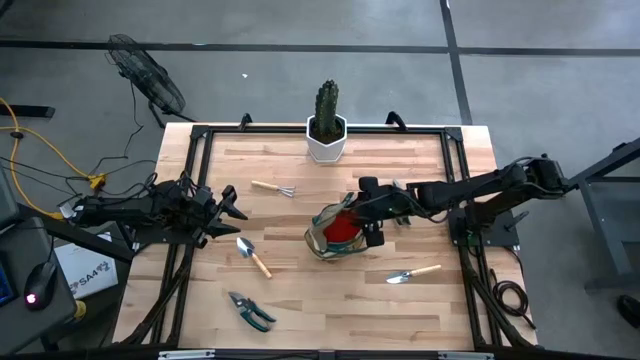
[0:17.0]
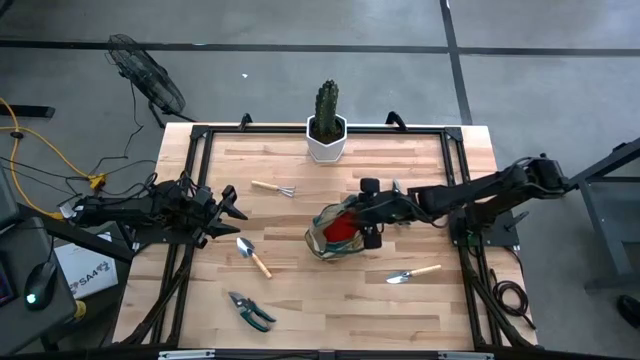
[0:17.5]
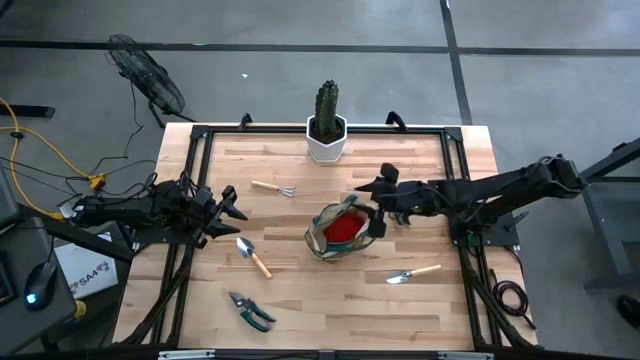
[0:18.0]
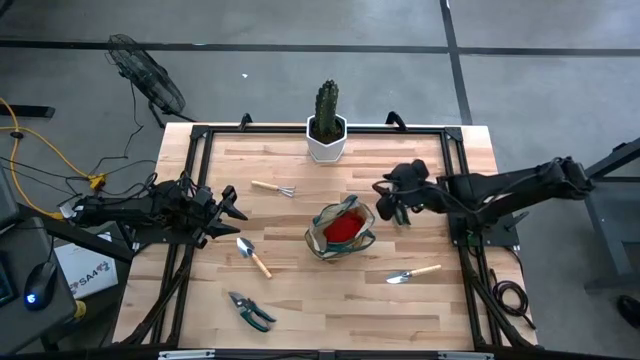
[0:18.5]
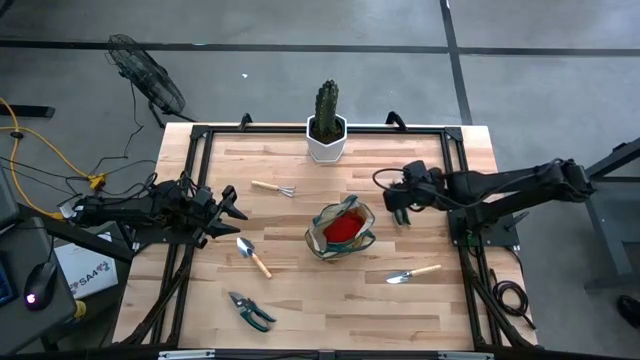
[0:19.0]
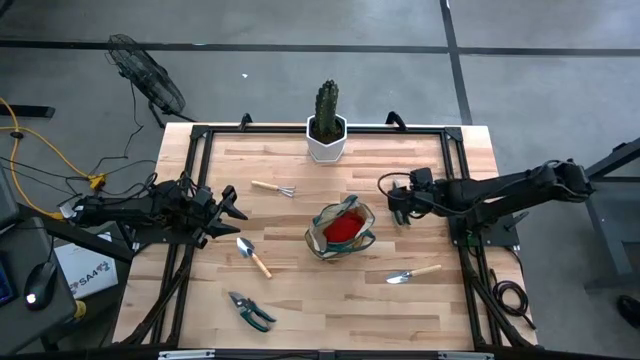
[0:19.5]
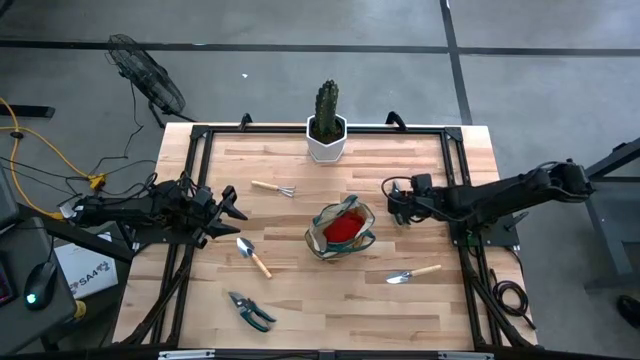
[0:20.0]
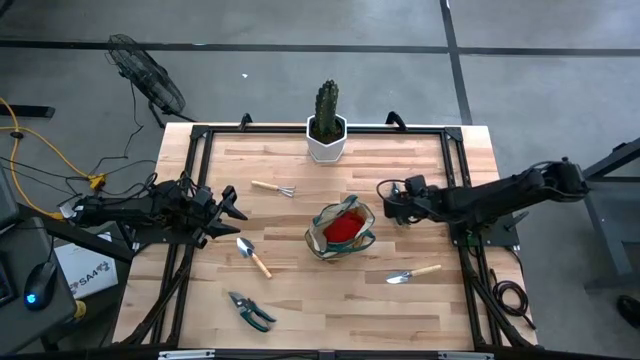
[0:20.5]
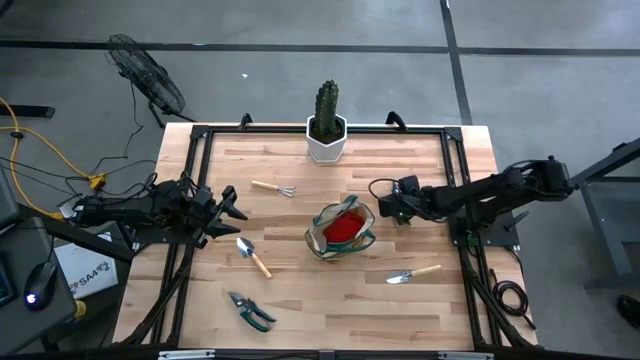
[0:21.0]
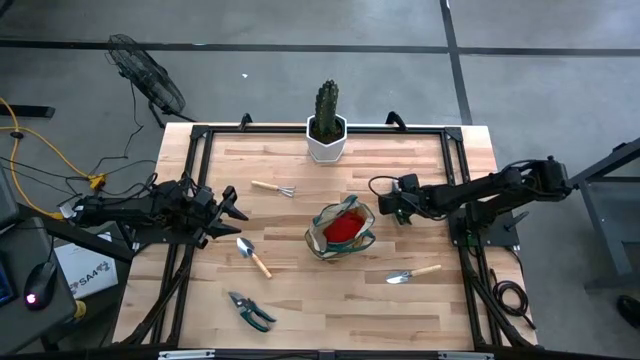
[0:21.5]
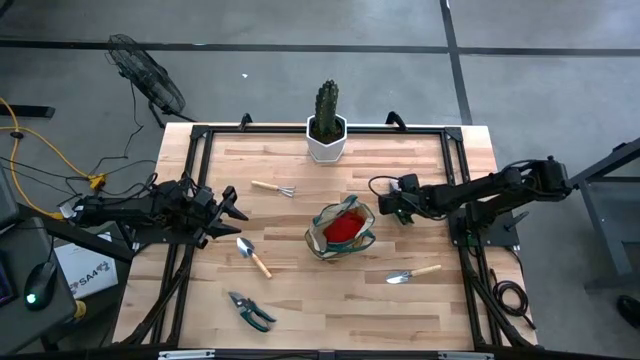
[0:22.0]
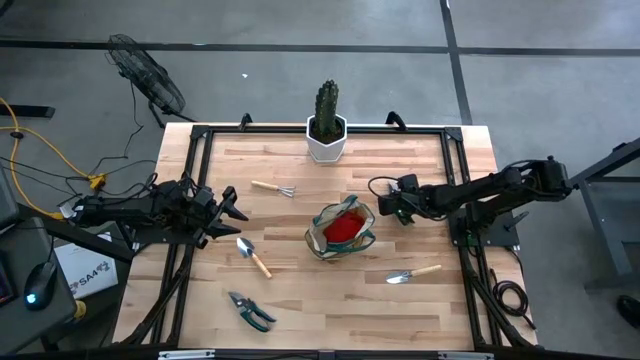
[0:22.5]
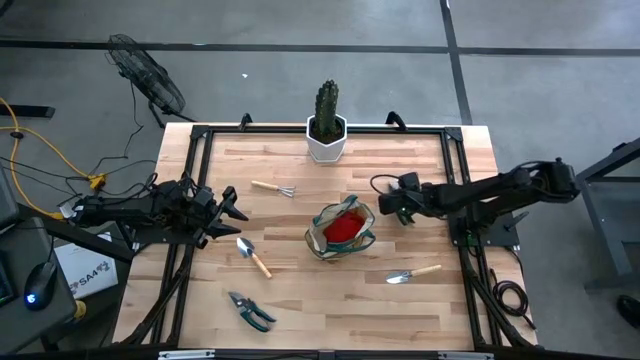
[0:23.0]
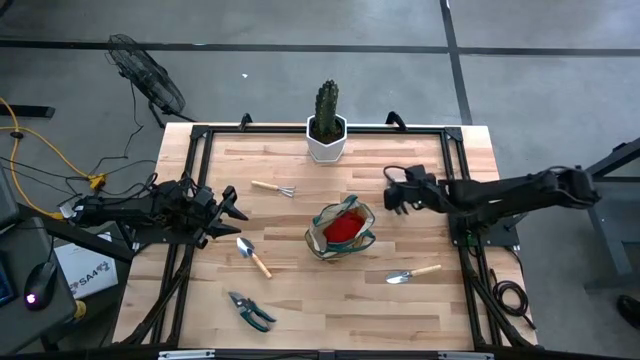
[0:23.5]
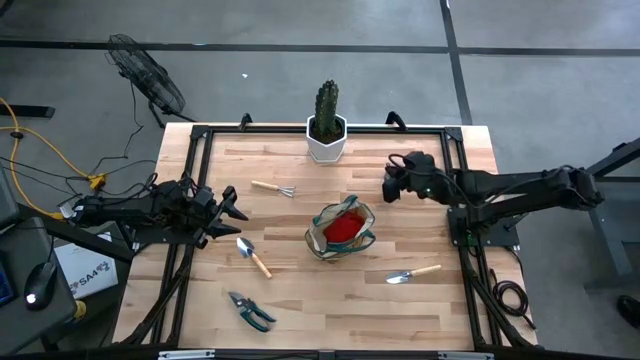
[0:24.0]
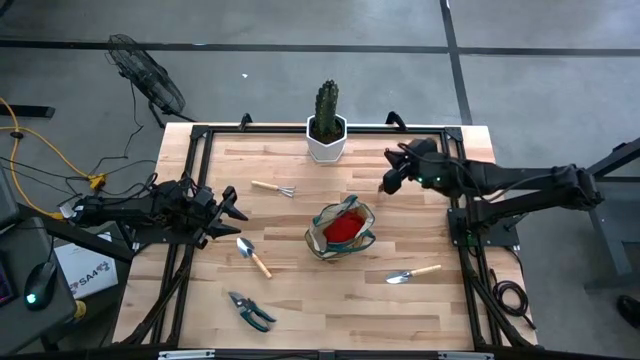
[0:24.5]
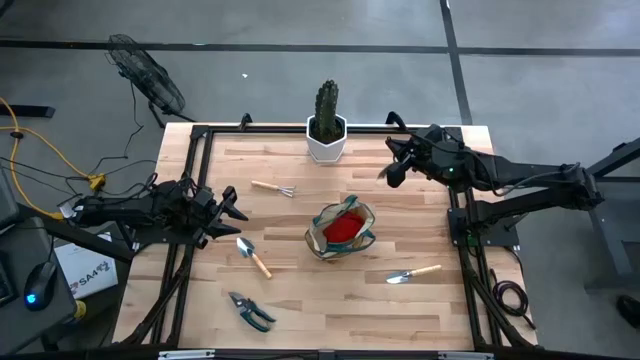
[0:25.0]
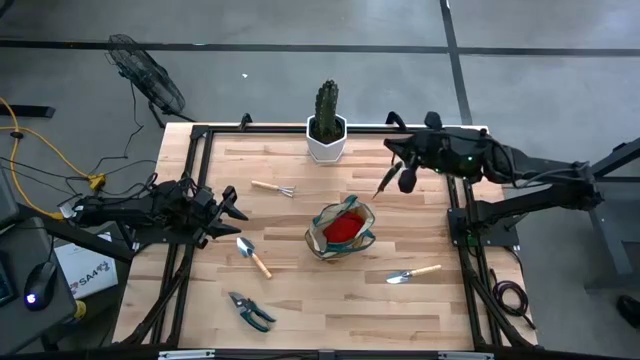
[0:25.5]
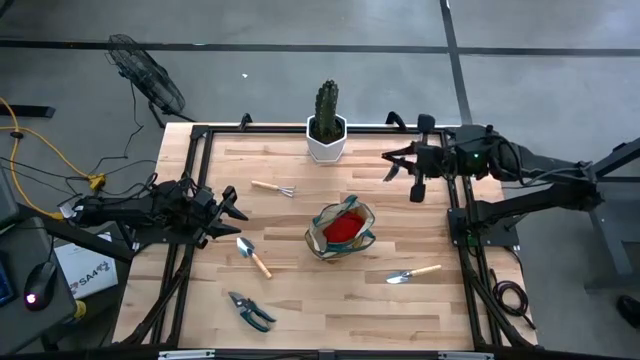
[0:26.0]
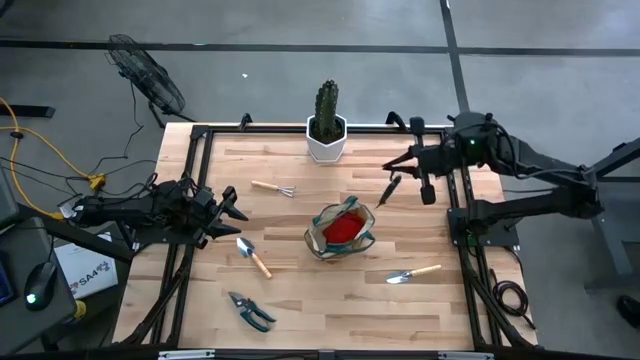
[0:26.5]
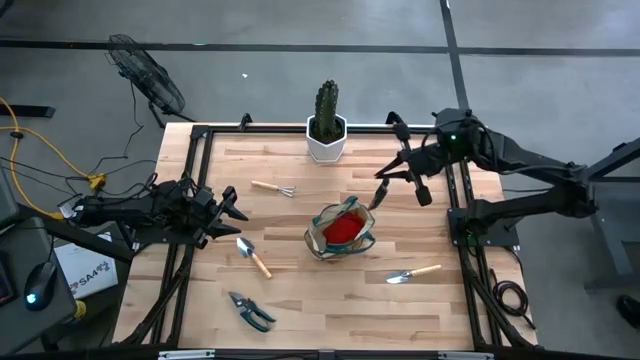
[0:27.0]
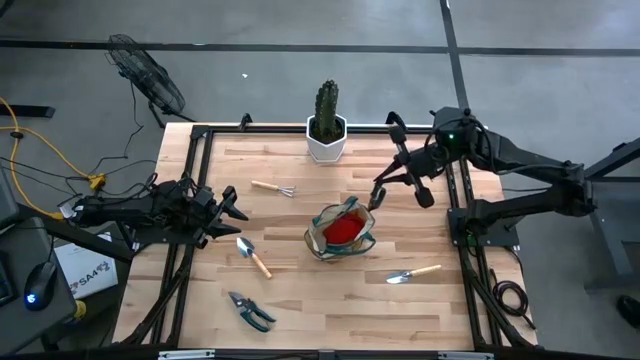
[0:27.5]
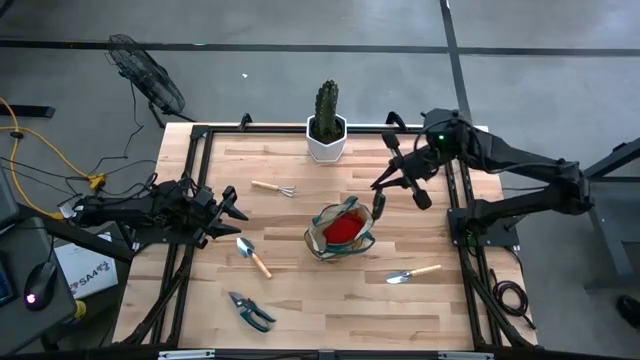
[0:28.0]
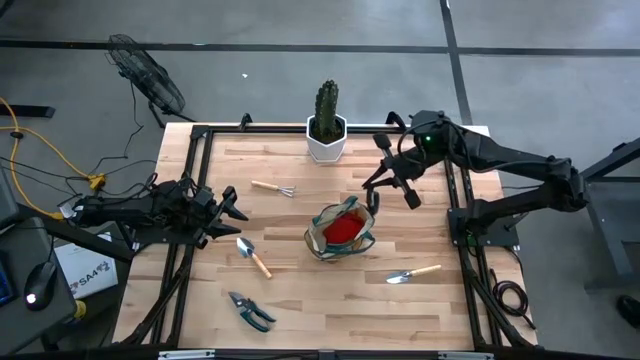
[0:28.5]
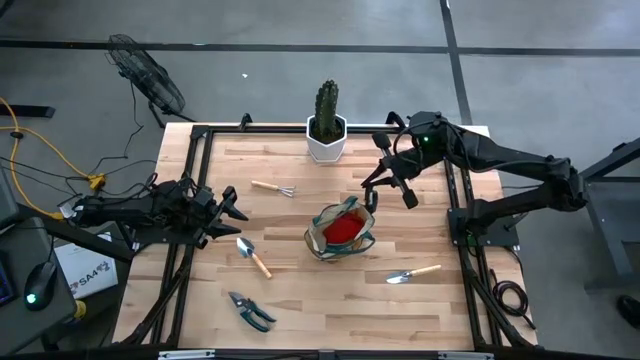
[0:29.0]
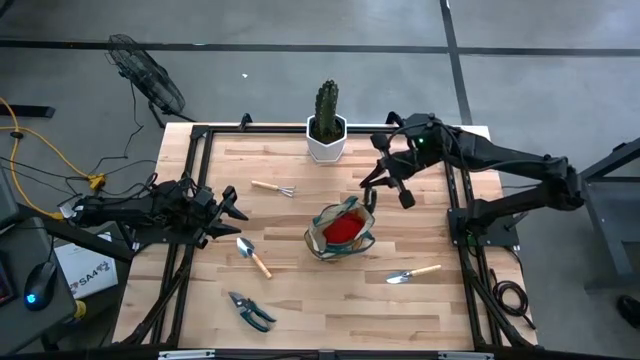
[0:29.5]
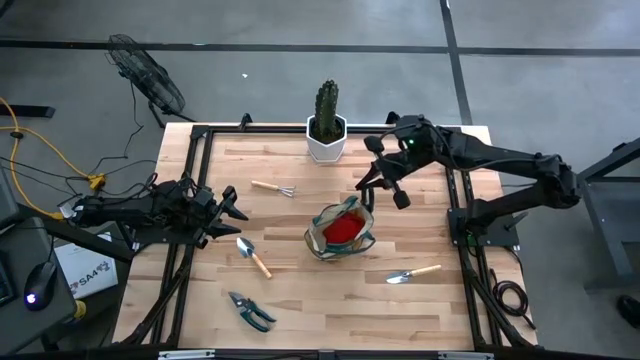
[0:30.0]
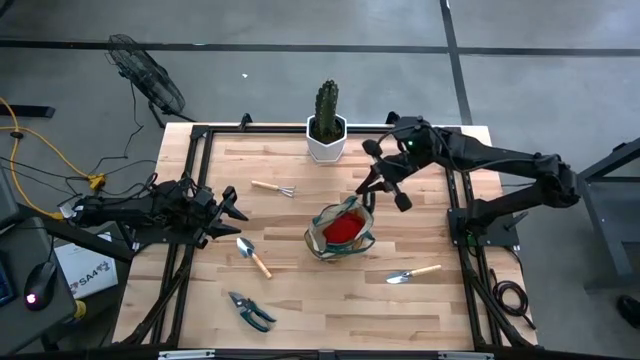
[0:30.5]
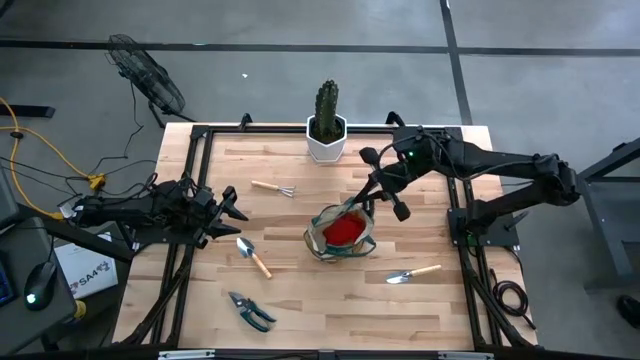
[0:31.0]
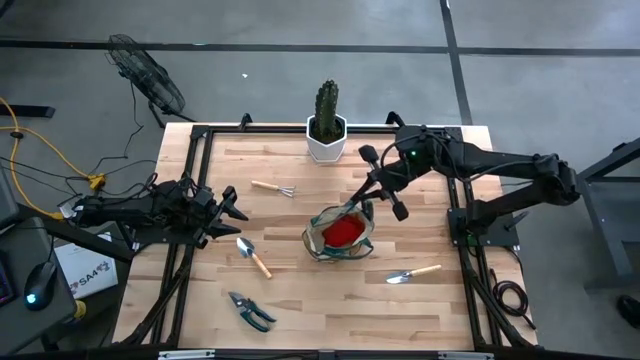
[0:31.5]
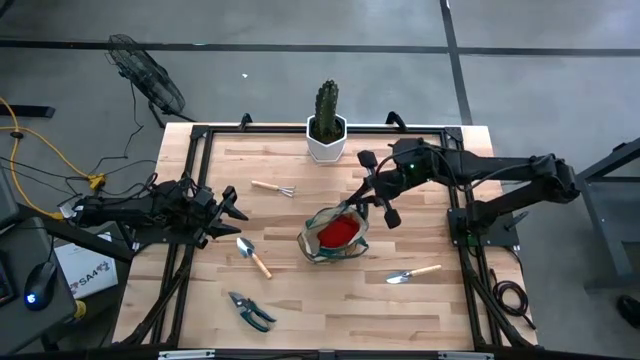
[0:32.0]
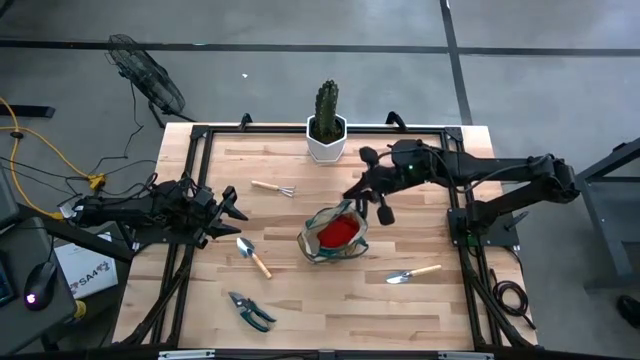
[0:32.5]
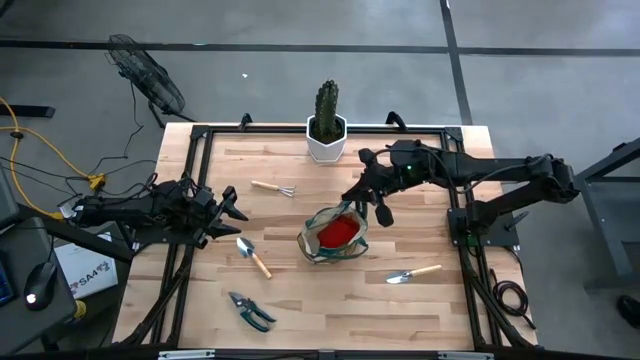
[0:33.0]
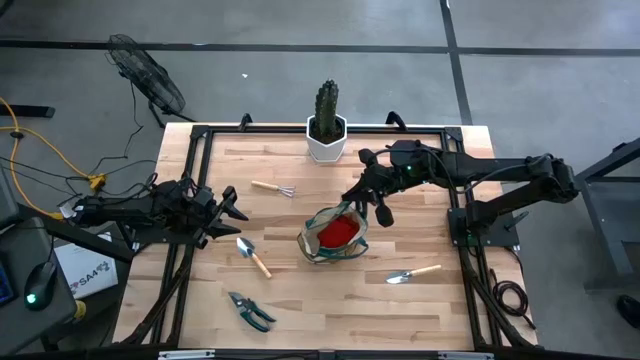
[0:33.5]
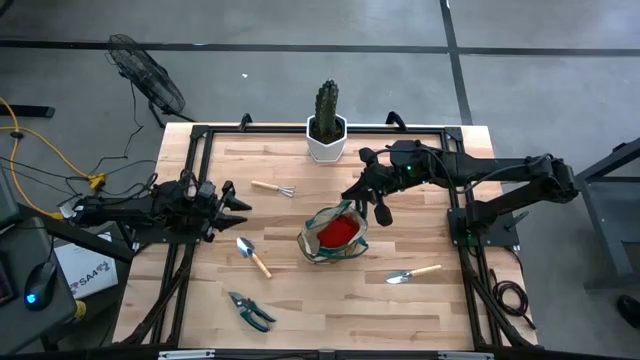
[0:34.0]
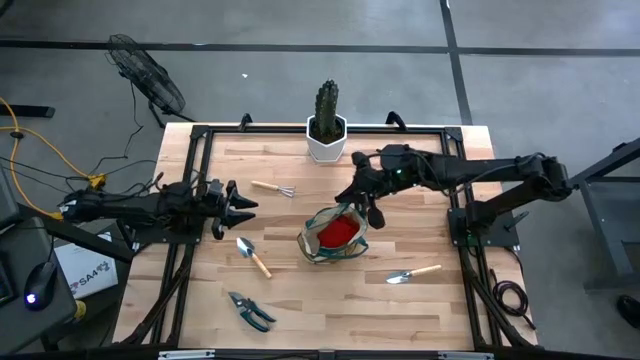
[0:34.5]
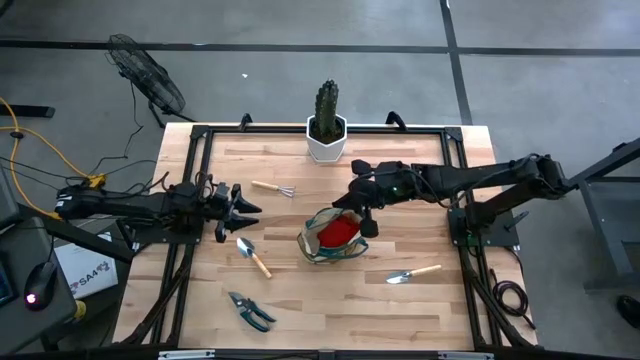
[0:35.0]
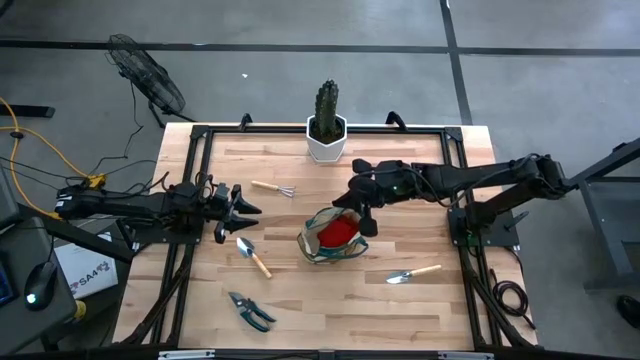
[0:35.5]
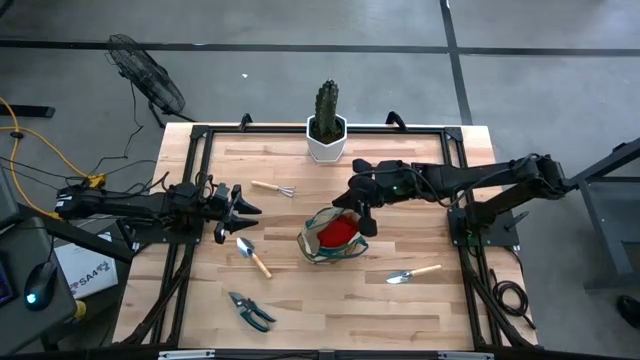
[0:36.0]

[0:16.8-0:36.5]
Task: Pick & Place Garden tools in Gardening bag
Put the green shears into the brown gardening bag
